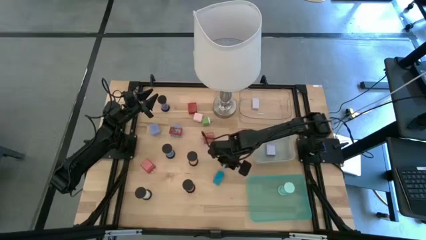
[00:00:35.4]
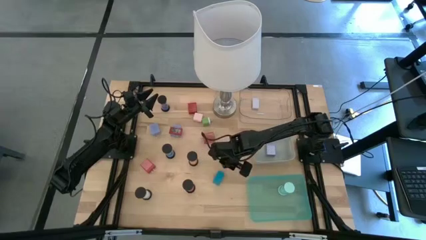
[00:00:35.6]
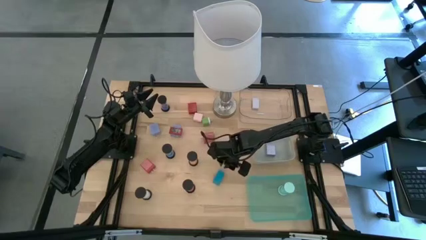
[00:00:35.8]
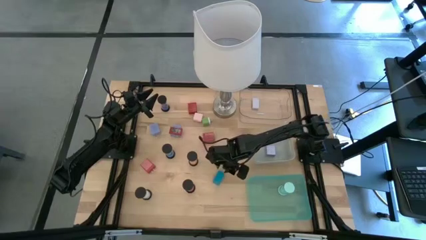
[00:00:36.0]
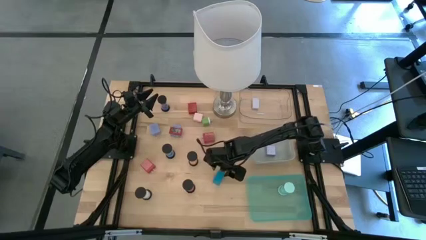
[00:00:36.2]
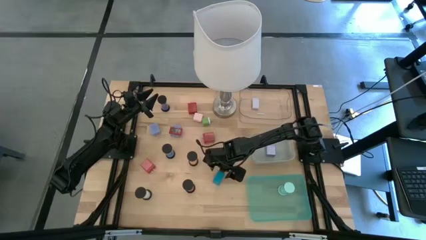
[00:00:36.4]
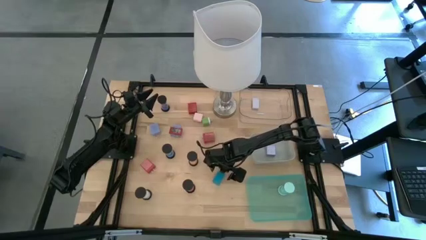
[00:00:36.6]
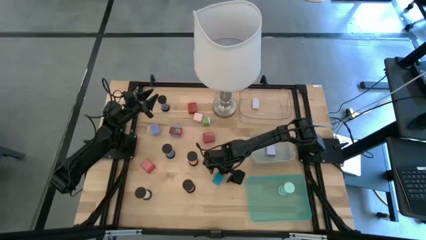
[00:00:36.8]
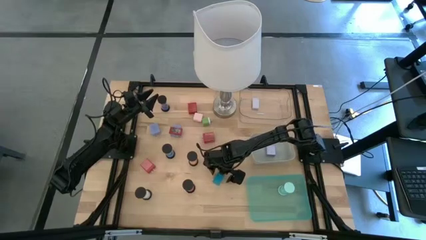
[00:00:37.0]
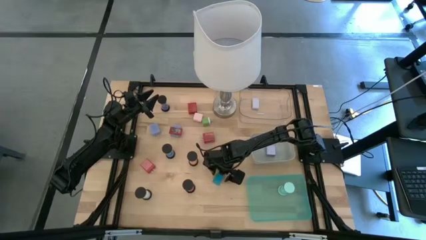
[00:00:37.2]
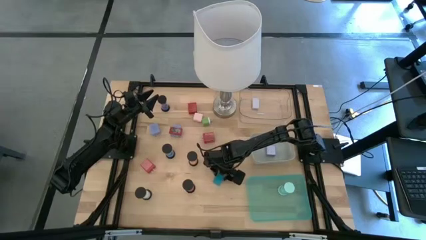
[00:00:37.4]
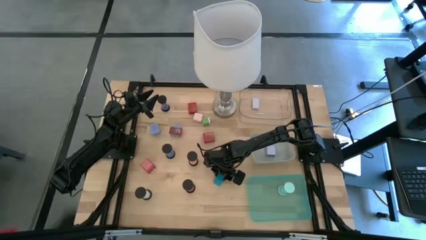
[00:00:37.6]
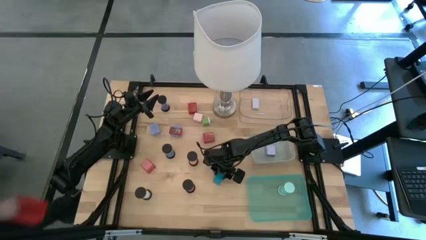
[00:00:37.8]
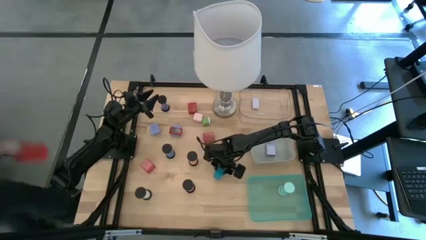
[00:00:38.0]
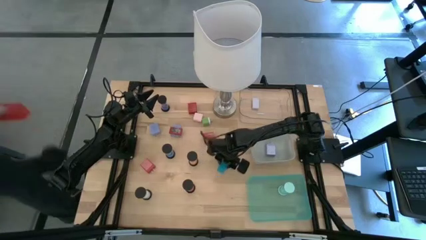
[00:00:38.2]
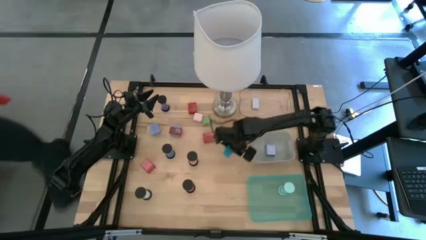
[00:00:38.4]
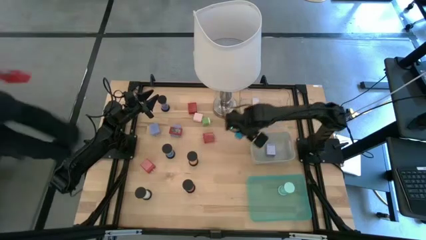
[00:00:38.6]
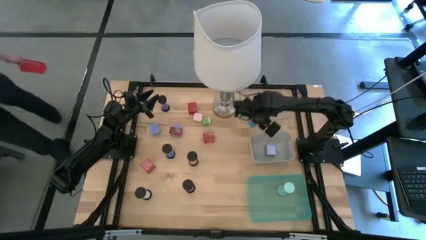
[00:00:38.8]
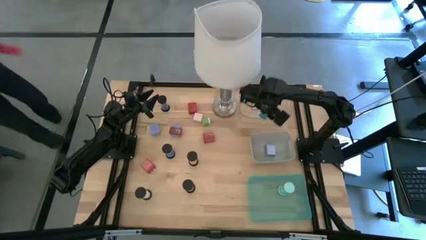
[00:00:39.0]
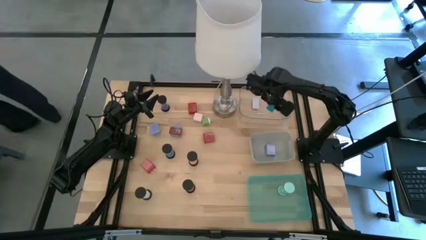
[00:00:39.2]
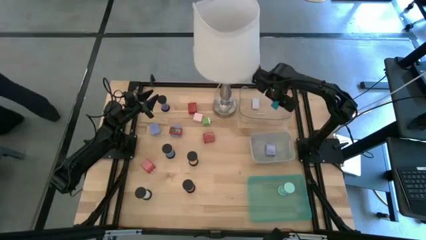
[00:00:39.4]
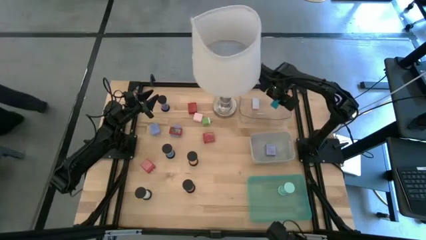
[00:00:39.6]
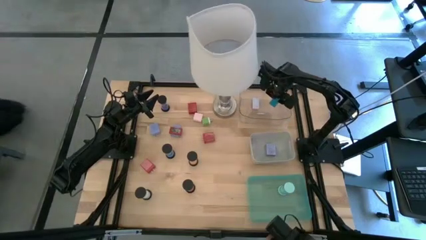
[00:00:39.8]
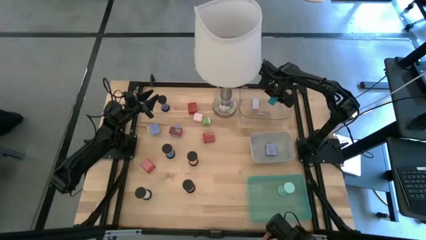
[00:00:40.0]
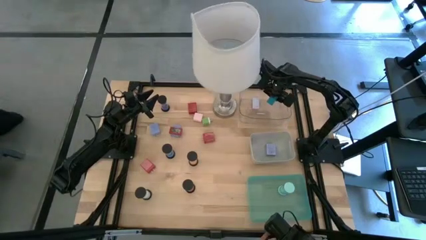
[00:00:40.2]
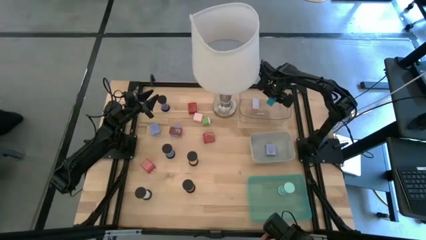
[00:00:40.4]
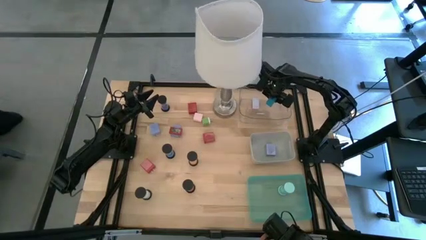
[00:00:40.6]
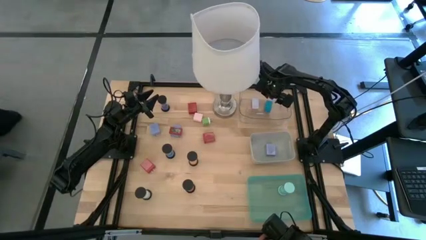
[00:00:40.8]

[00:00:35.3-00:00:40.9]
Task: Pick & Place Office items
Put the blue timer into the transparent bin

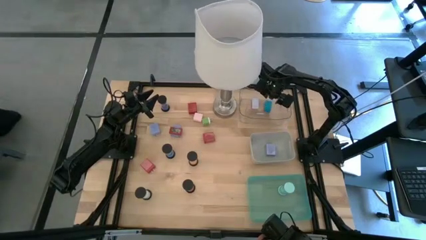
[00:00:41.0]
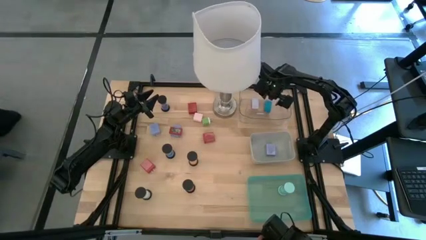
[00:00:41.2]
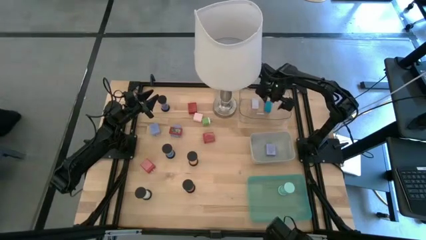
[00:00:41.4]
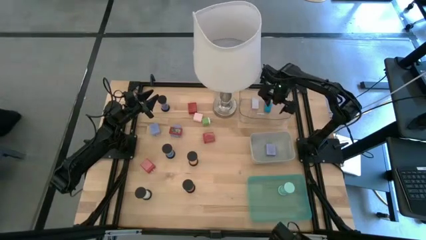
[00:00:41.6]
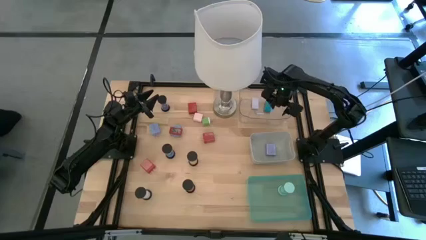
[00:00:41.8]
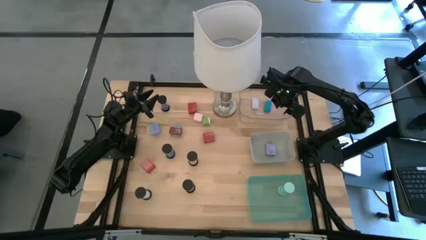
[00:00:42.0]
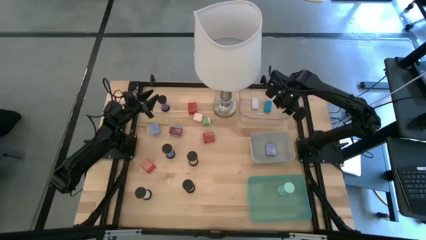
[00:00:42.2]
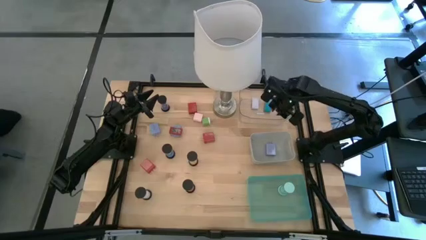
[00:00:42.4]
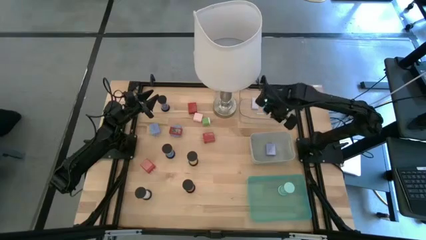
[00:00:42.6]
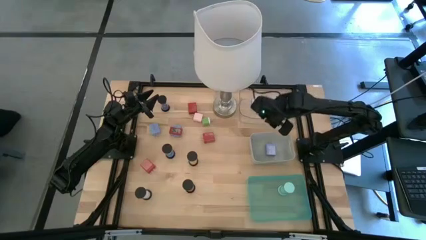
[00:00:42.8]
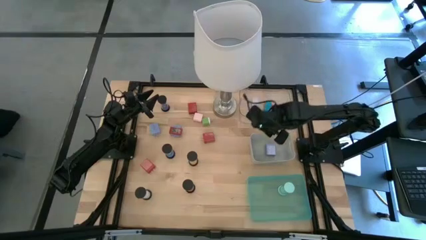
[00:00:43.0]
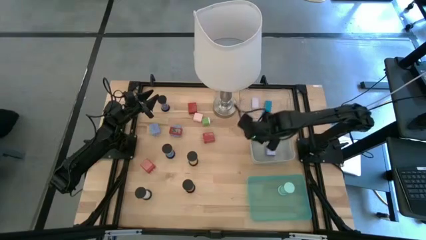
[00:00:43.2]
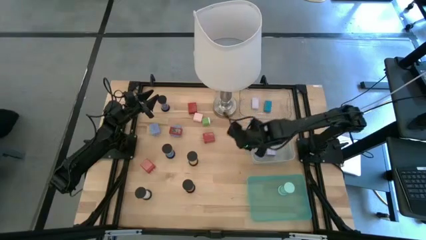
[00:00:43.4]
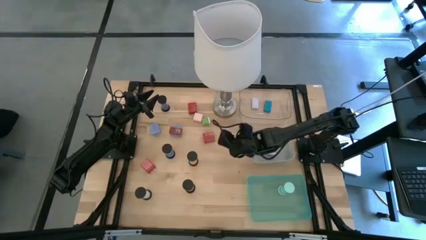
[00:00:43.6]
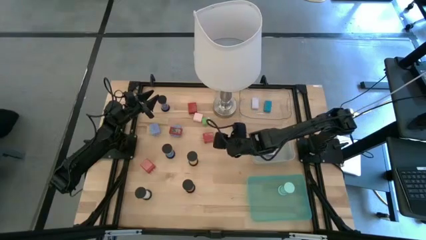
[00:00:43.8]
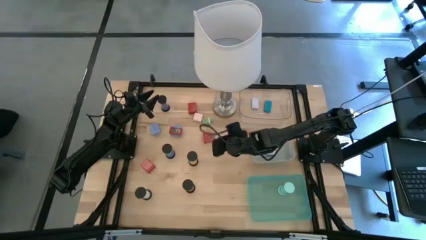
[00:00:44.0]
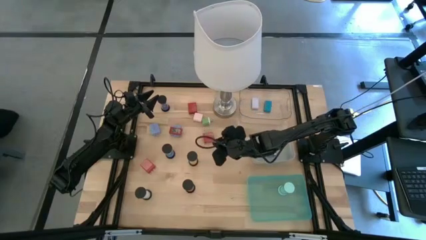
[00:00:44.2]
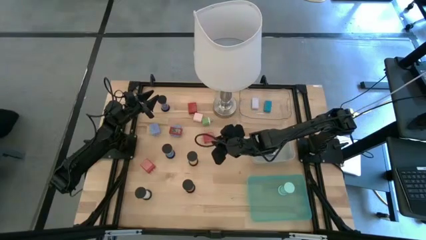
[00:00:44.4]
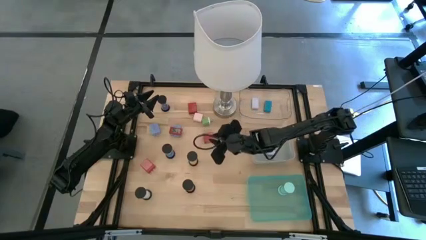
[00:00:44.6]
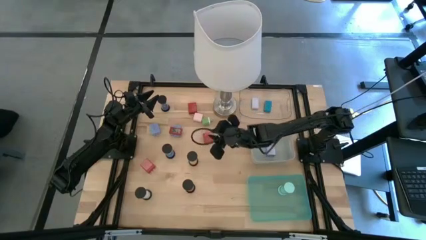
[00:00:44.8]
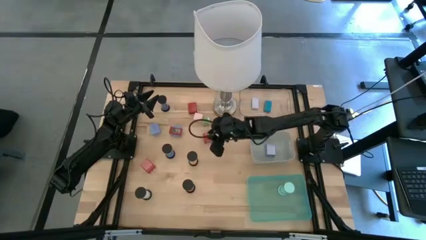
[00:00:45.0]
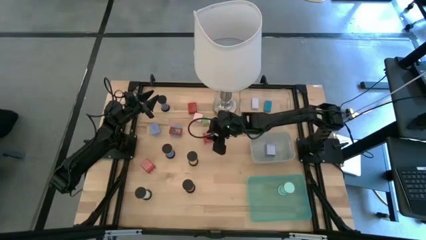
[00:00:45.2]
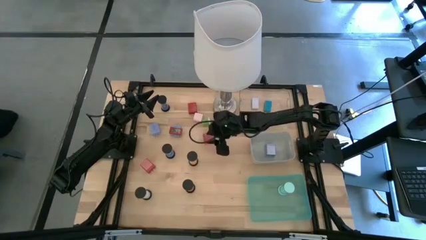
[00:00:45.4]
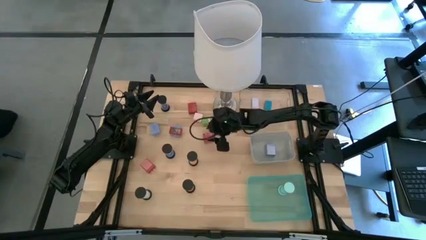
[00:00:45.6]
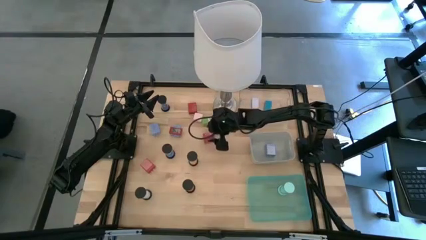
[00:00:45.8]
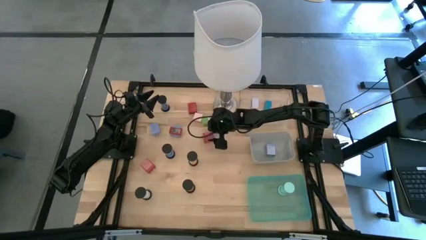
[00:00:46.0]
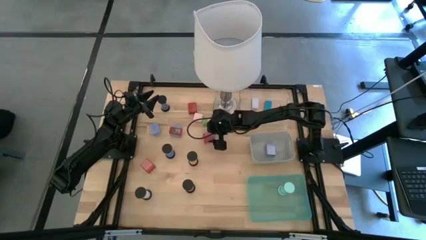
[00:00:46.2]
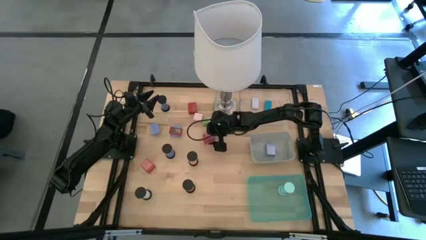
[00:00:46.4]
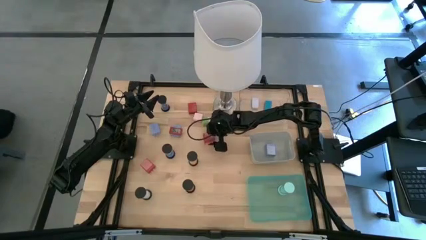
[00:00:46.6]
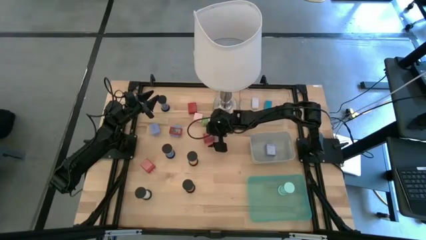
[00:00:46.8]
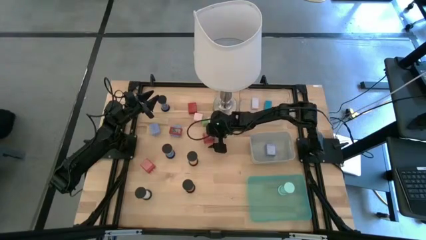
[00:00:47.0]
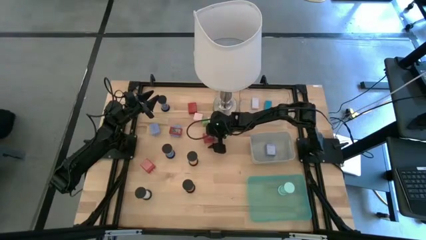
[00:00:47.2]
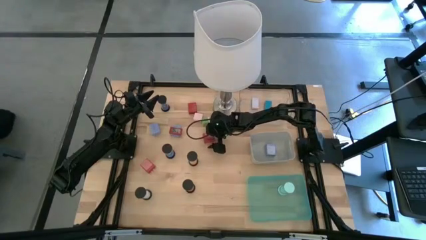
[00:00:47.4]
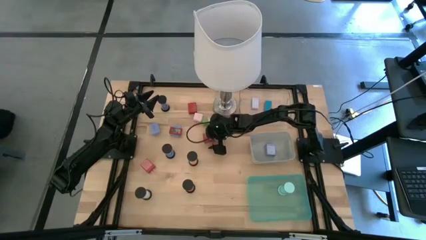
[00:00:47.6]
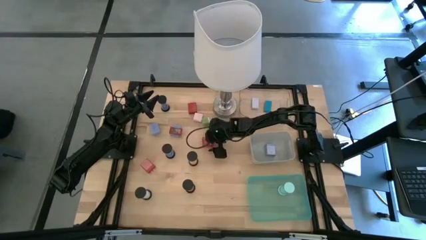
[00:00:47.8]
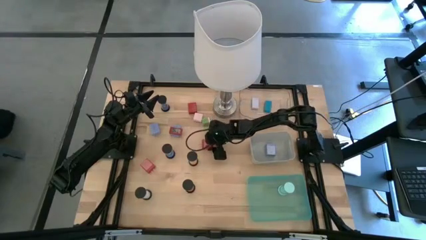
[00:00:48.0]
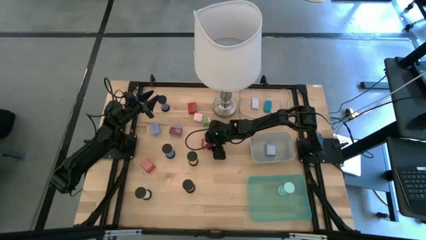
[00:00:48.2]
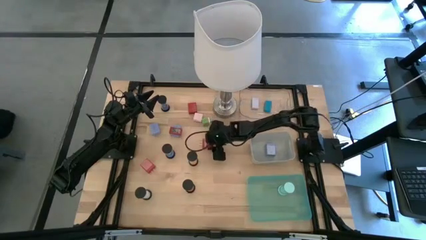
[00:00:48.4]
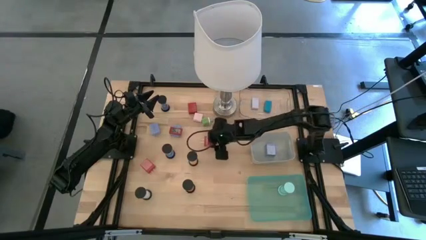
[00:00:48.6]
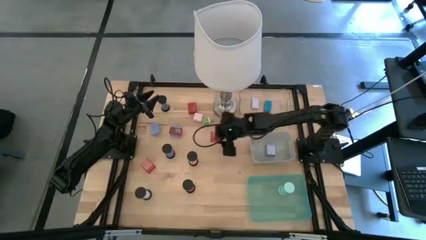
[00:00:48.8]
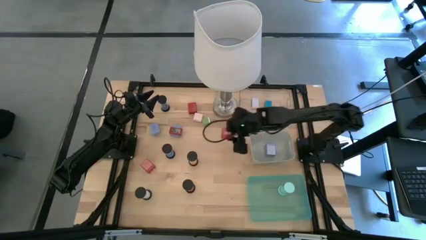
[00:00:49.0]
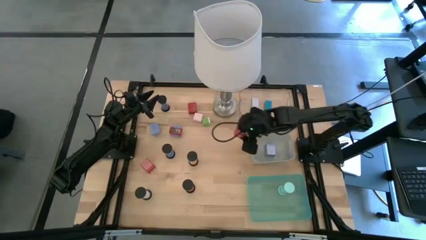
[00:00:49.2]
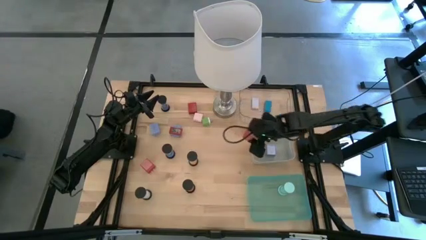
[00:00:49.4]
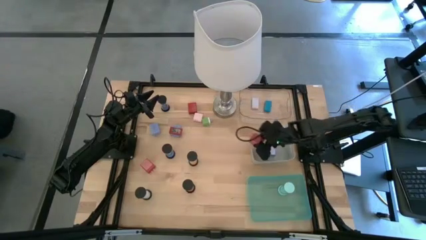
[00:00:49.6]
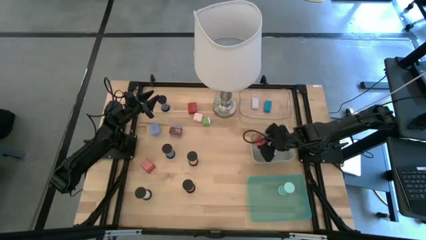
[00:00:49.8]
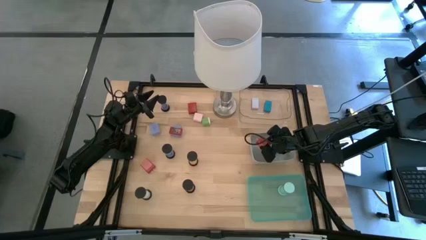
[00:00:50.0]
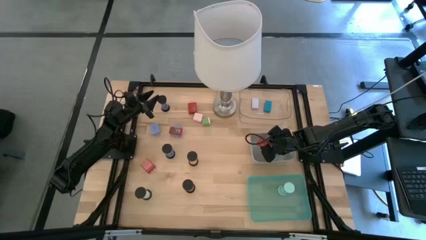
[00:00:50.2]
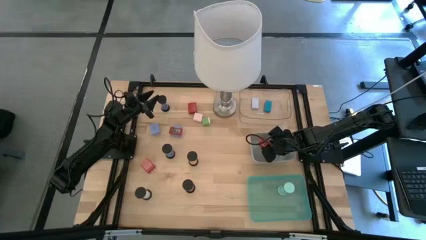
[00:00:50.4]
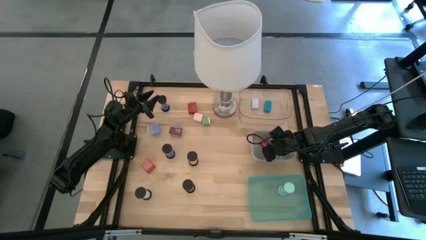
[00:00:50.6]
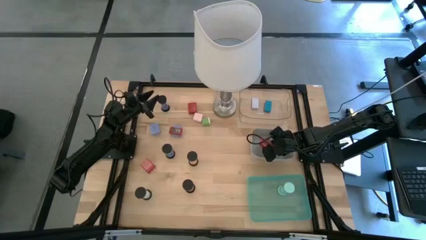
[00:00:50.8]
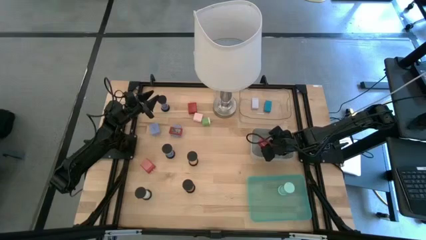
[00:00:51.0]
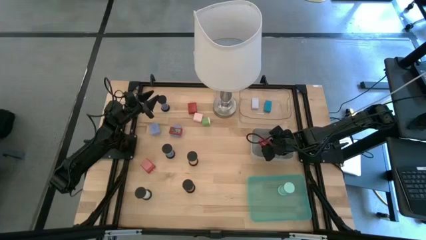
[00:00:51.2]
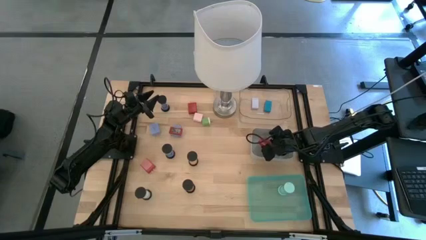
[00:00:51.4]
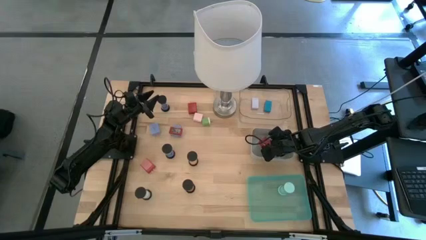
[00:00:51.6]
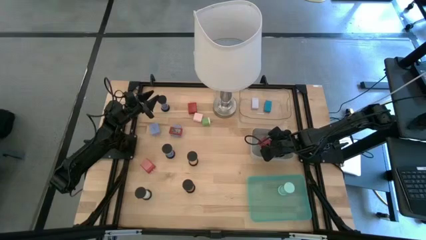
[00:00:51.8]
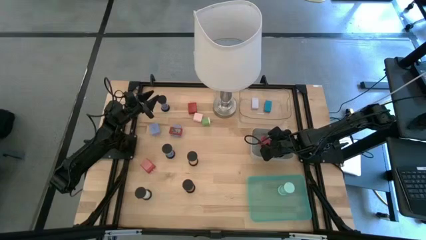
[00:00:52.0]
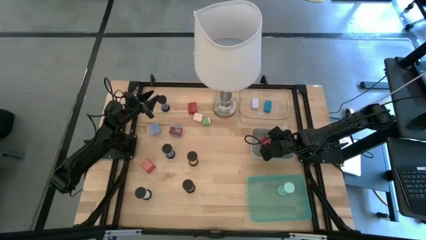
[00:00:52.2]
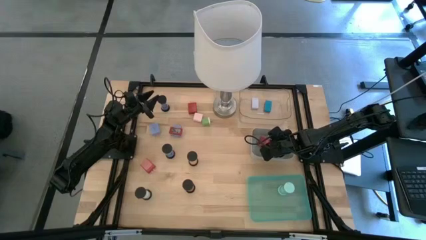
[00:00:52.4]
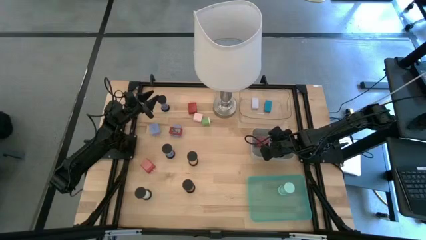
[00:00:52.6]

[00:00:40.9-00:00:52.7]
Put the red charger adapter into the gray bin
